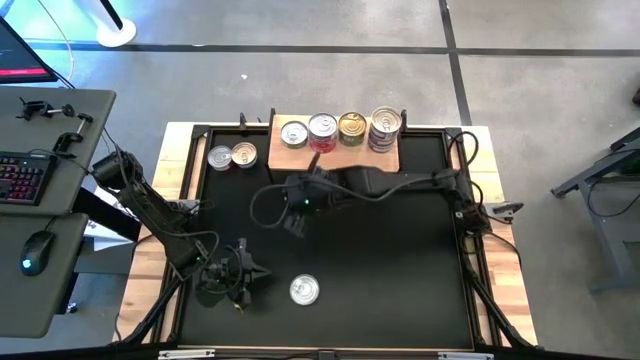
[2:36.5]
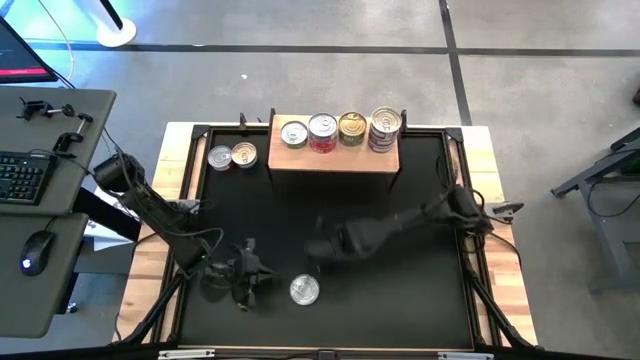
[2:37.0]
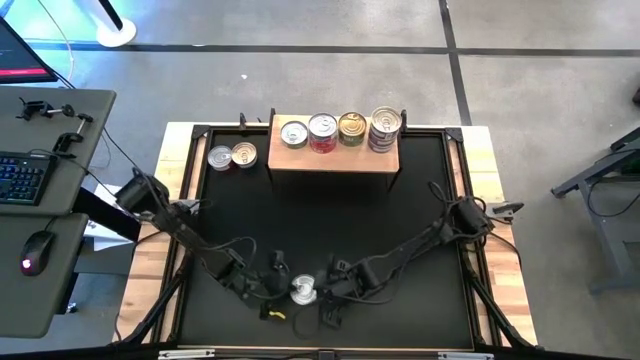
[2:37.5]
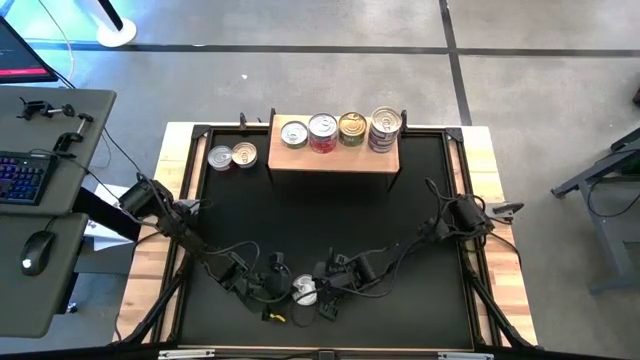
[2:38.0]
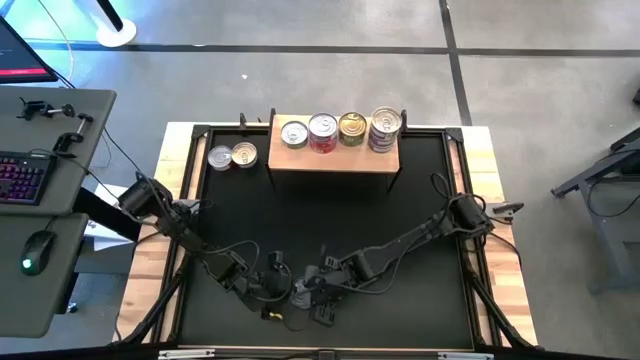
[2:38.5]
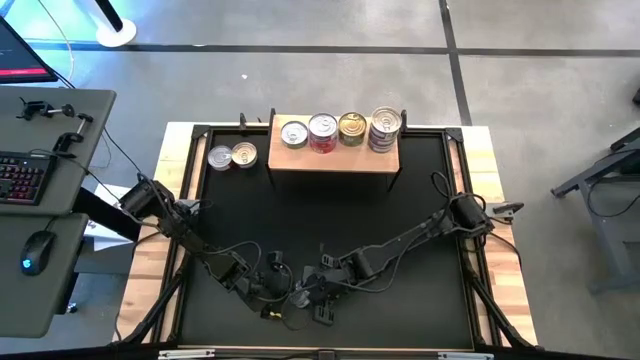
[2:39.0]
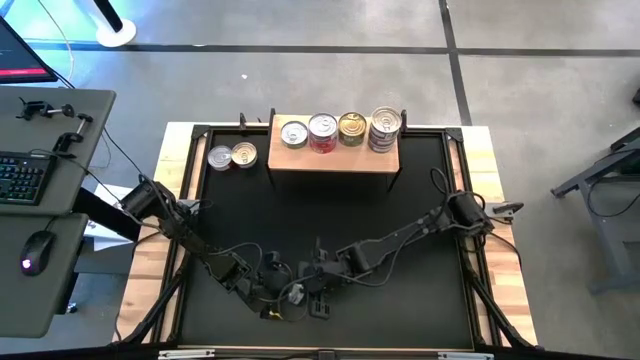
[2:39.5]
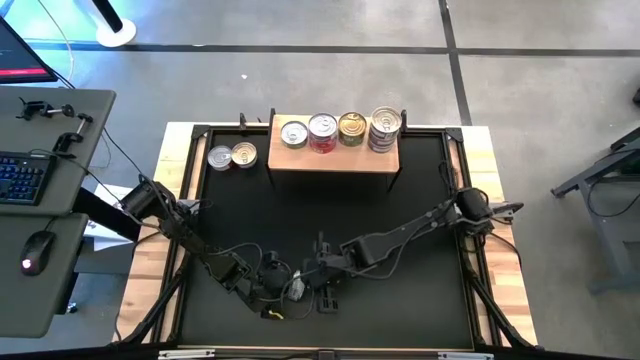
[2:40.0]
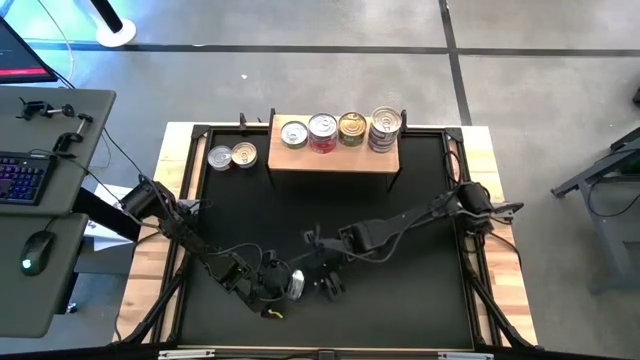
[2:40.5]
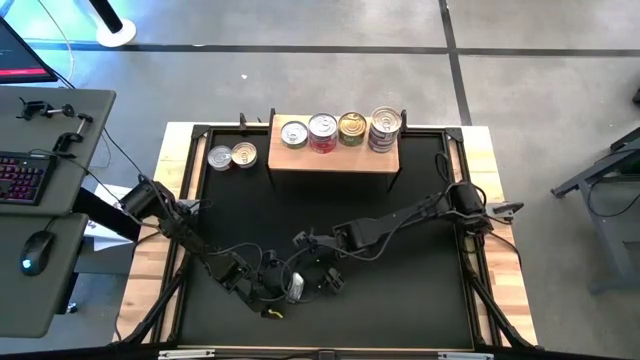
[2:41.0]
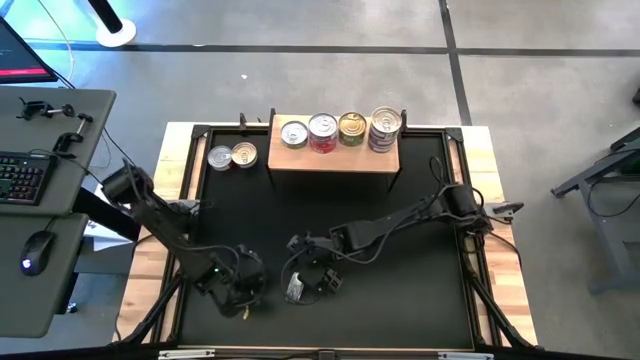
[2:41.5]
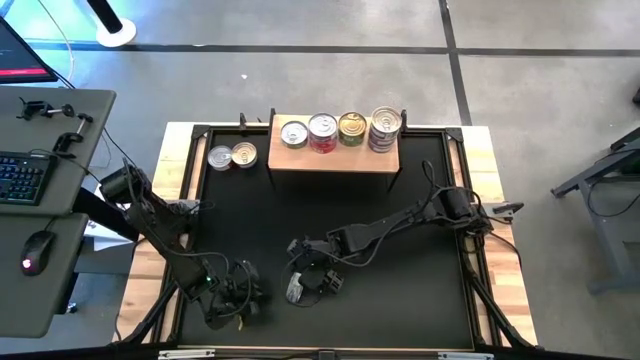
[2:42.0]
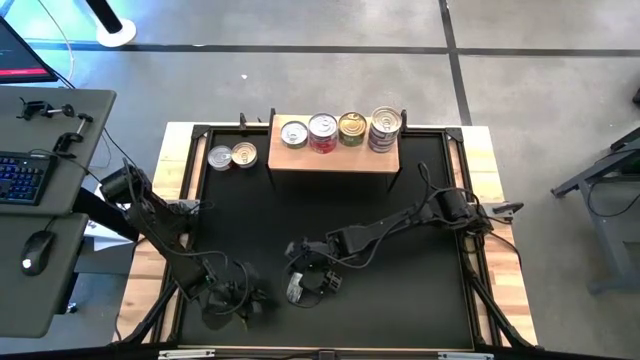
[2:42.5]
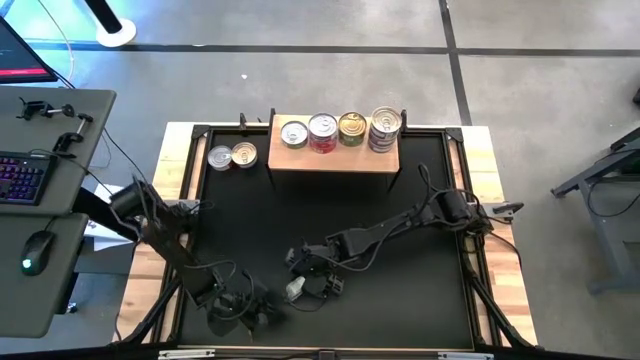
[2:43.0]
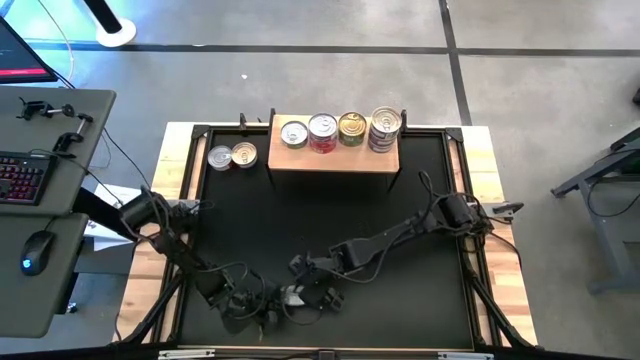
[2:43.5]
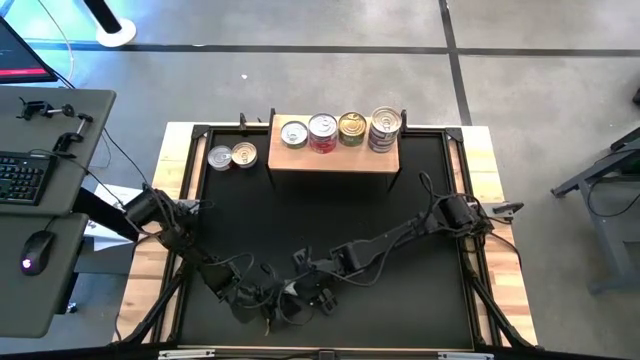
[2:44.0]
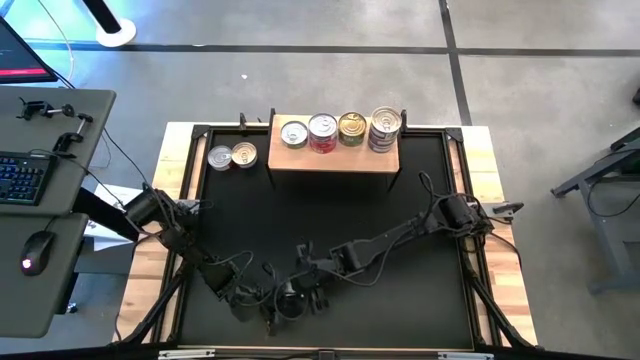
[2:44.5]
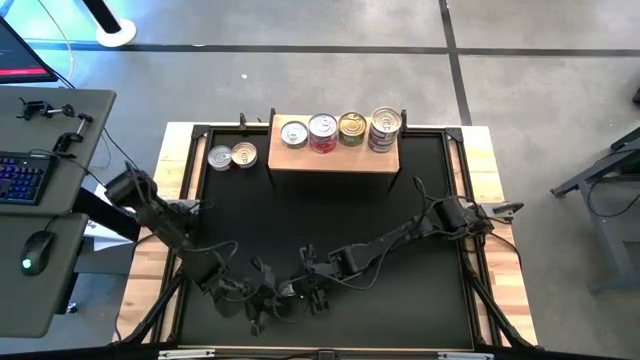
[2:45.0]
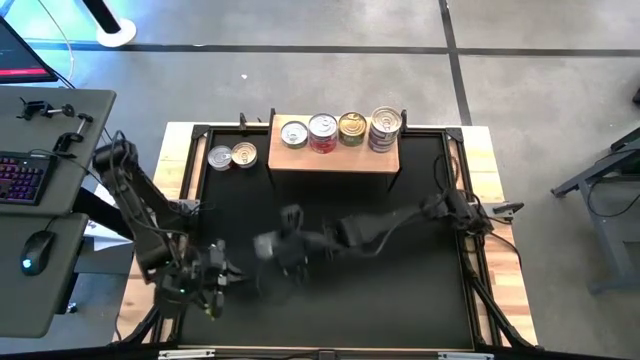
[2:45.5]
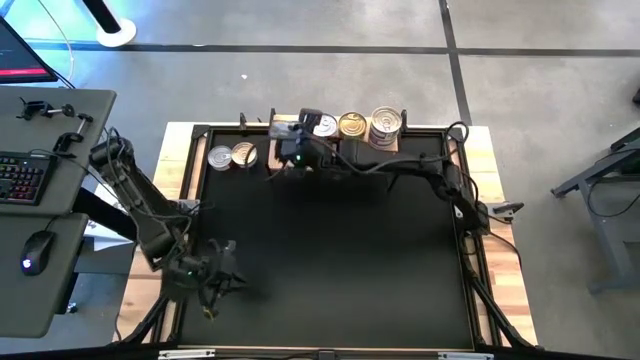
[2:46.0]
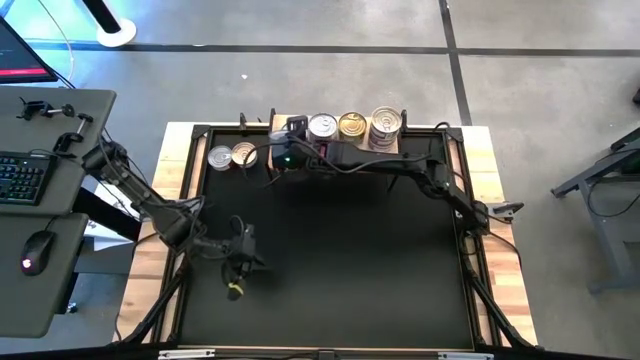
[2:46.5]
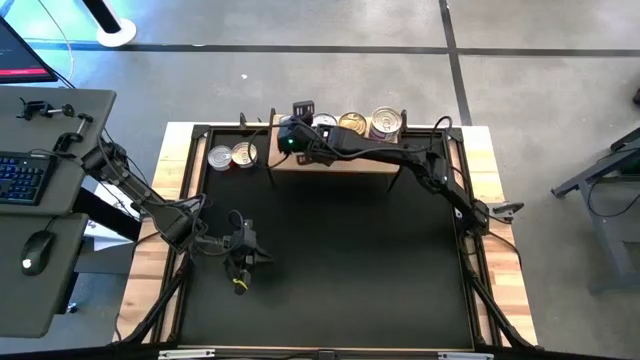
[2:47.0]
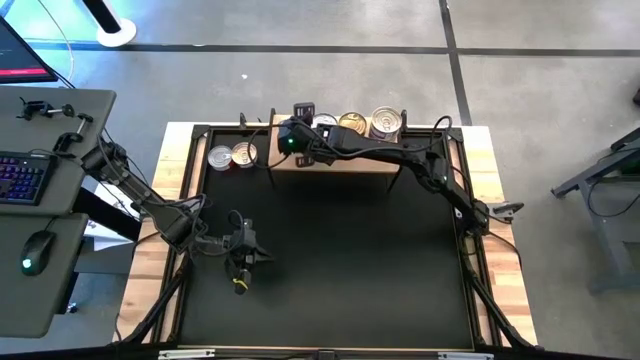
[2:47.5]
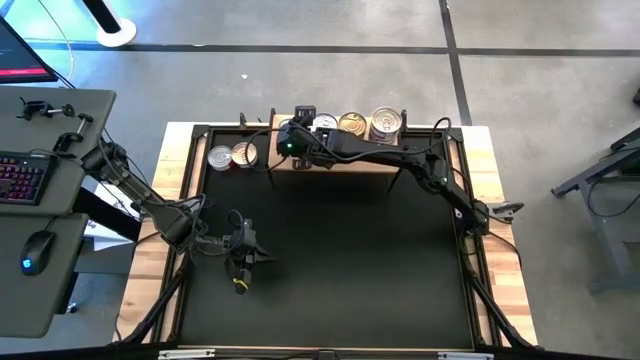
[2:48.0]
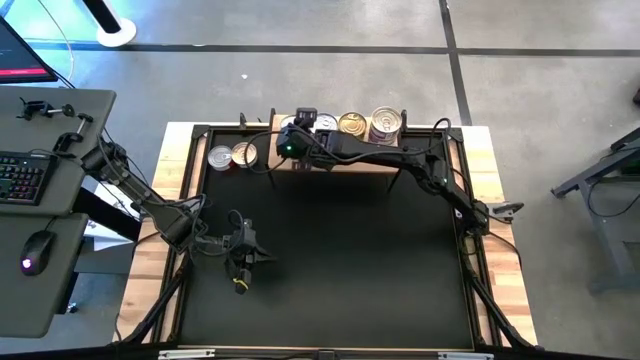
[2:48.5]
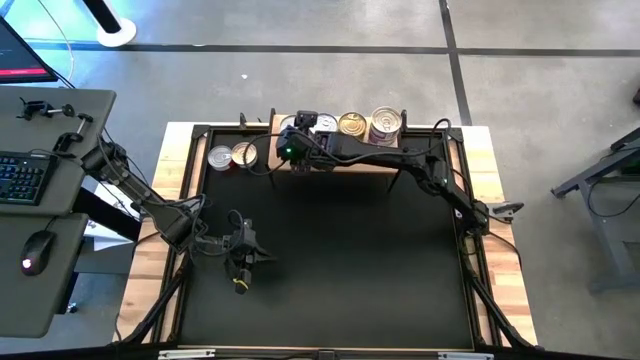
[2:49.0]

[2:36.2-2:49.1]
Task: Stack canned seafood by type on shelf
Stack the light green tuna can on top of the other light green tuna can

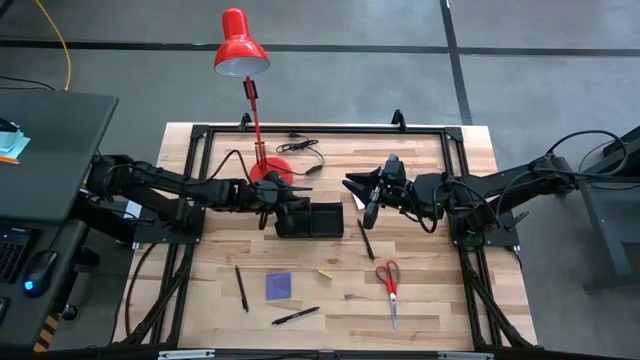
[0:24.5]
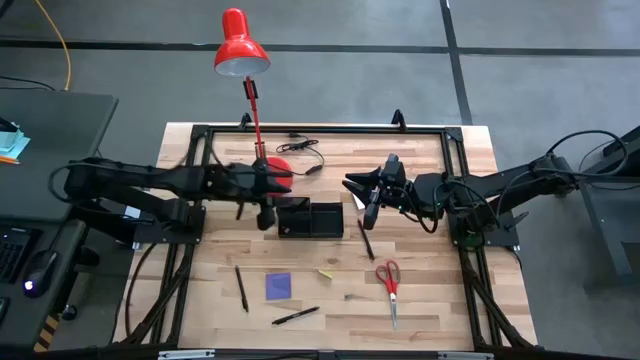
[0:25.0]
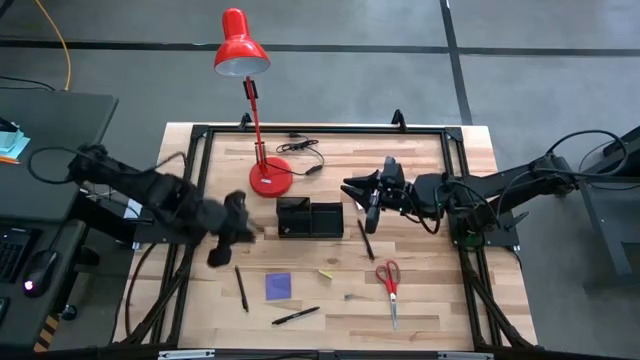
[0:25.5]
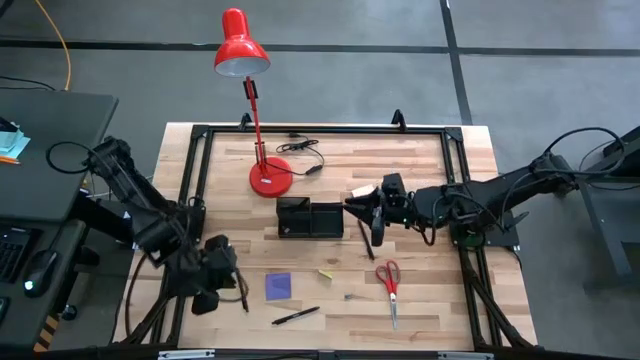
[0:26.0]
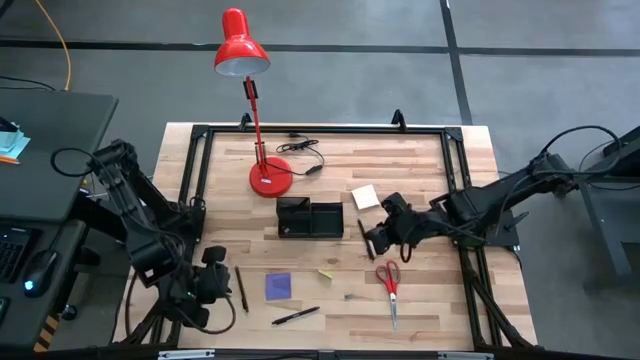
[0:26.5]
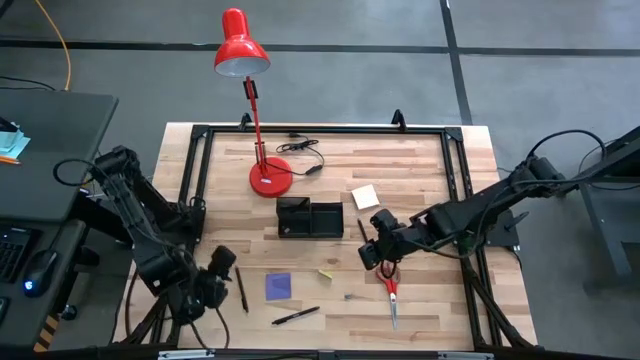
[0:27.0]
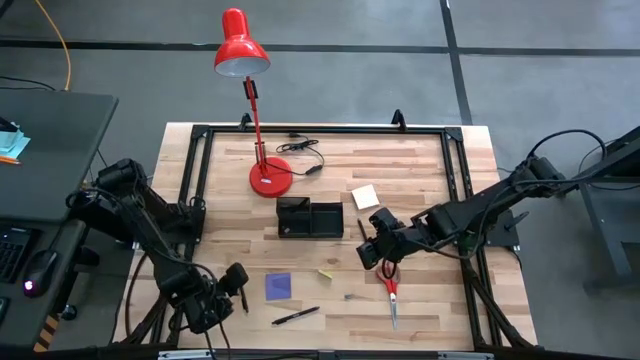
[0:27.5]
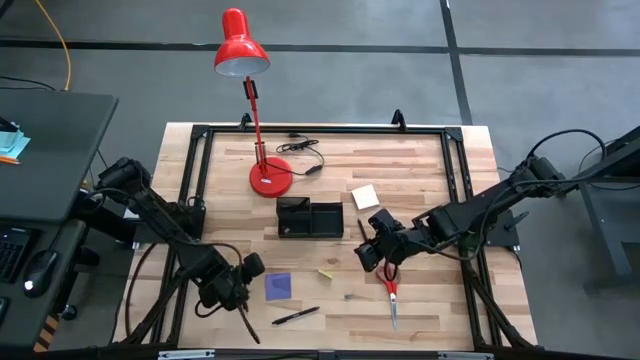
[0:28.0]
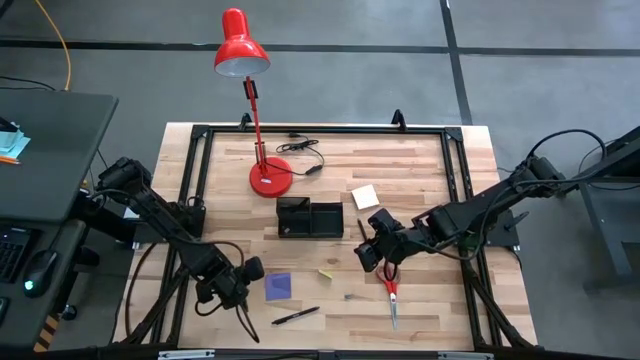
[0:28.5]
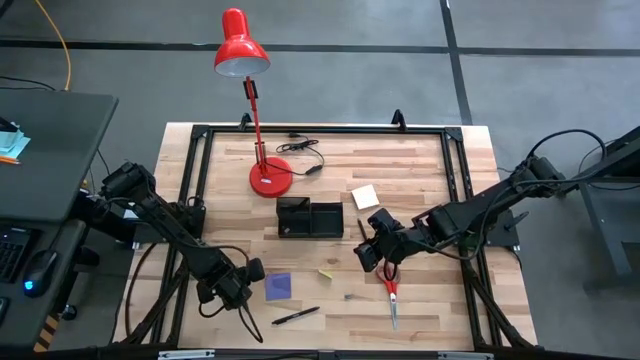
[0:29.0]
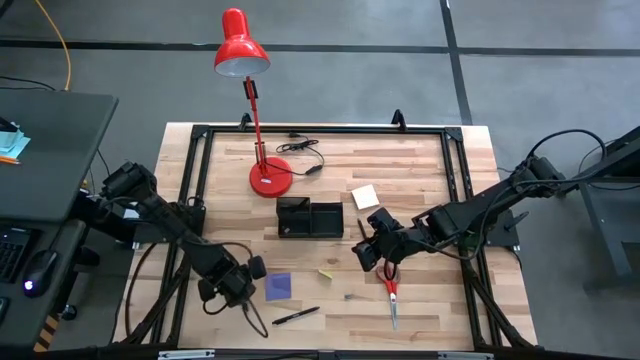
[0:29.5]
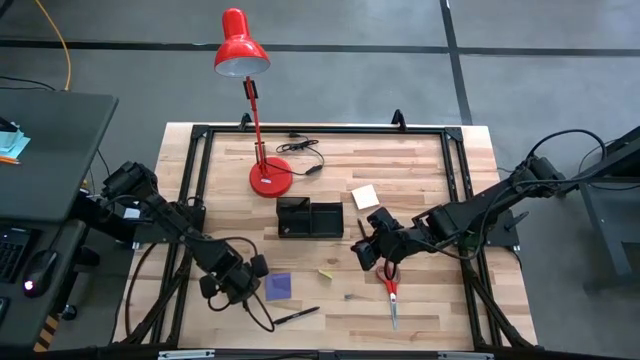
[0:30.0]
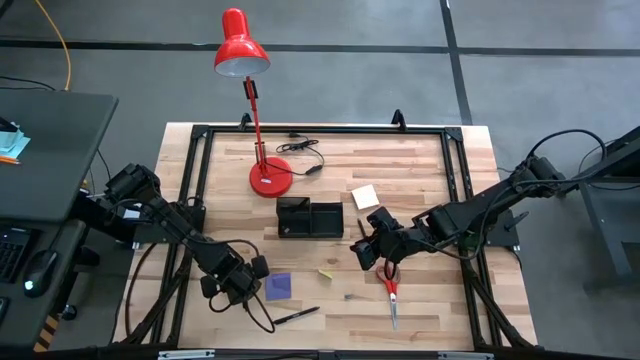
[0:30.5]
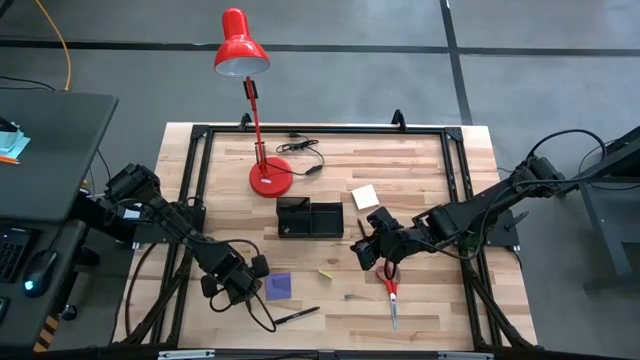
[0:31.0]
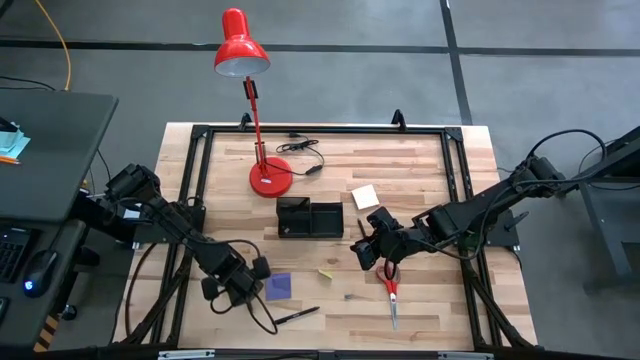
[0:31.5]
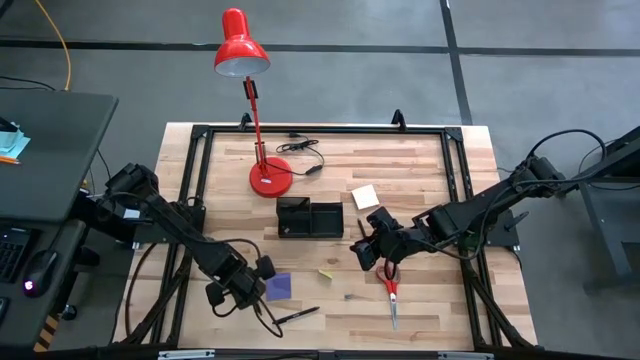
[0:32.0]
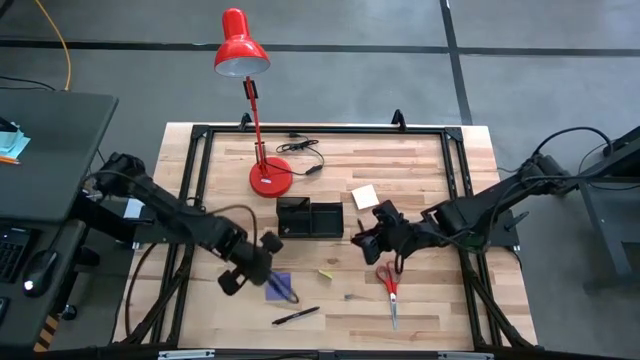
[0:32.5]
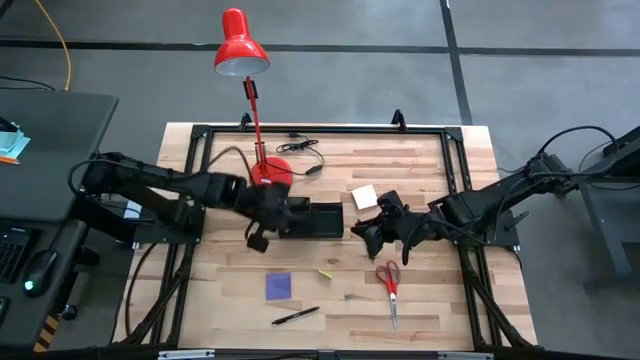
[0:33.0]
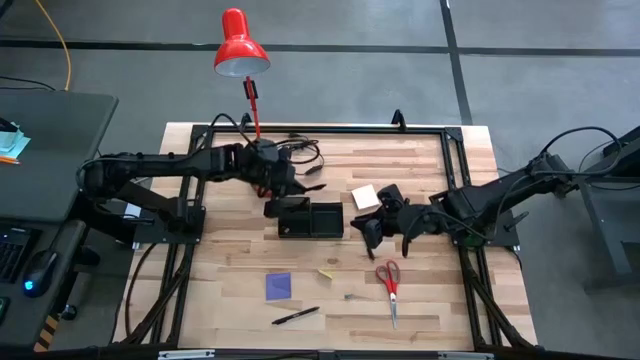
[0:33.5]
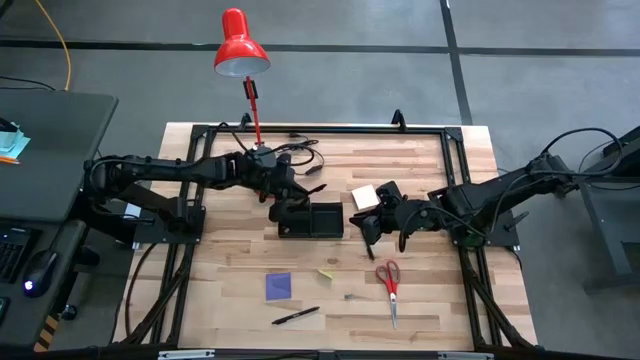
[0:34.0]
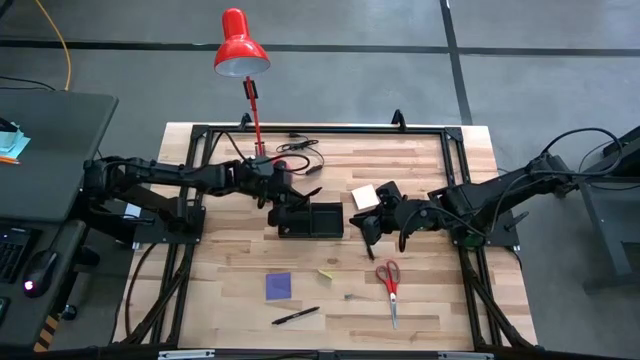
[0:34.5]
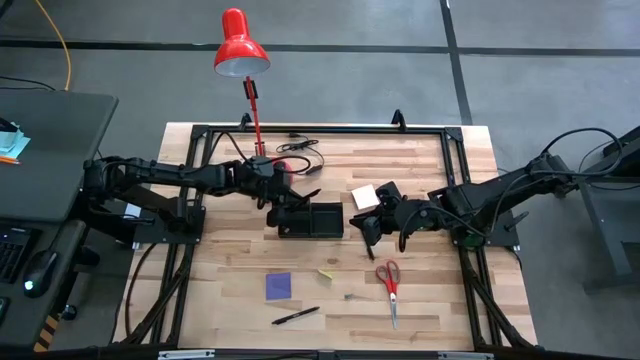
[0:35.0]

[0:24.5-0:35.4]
Task: Pick and place office supplies into organizer
Put the left pen into the desk organizer
